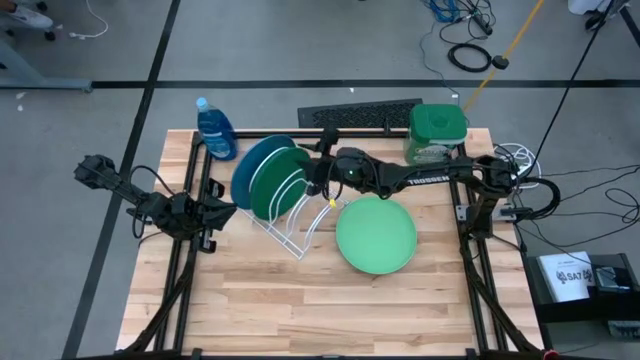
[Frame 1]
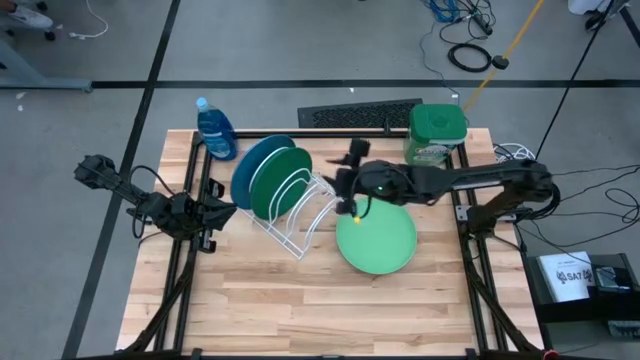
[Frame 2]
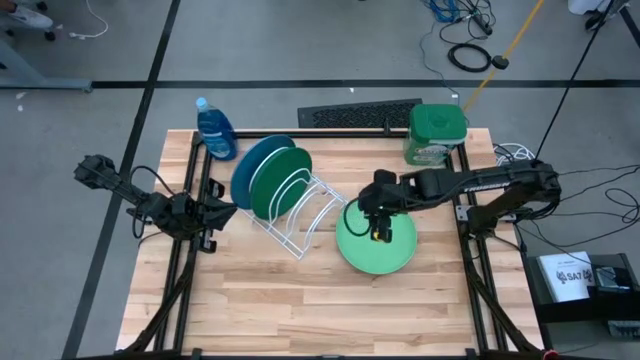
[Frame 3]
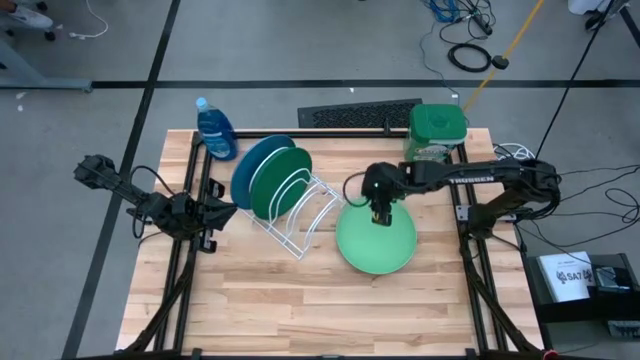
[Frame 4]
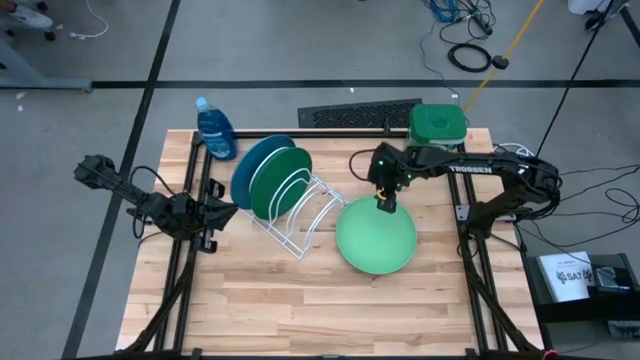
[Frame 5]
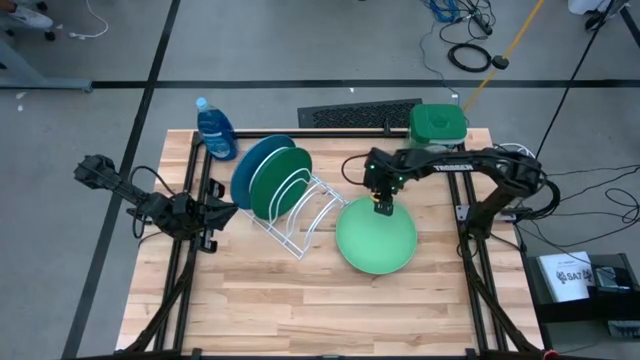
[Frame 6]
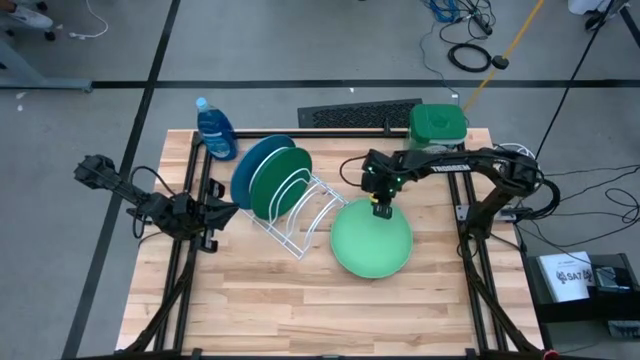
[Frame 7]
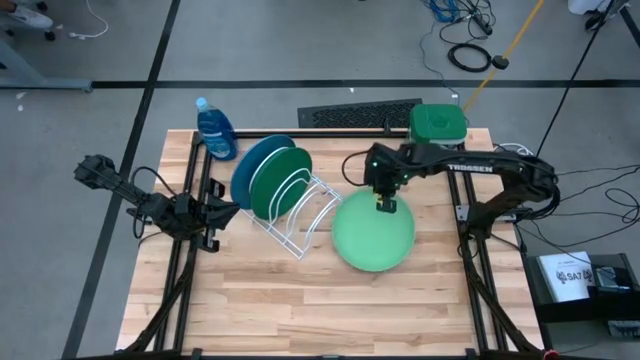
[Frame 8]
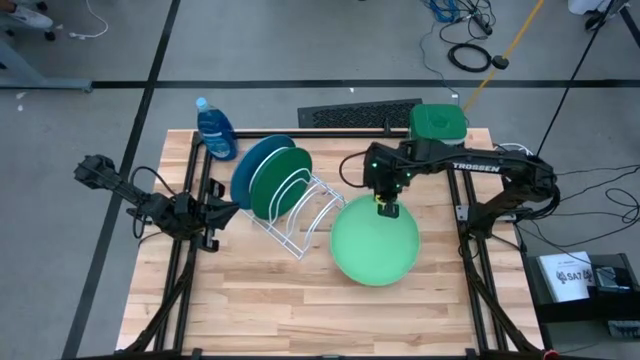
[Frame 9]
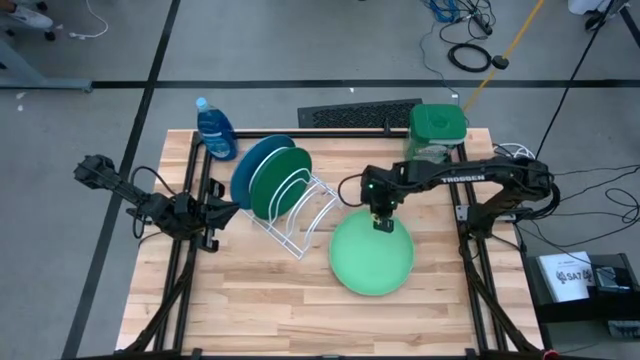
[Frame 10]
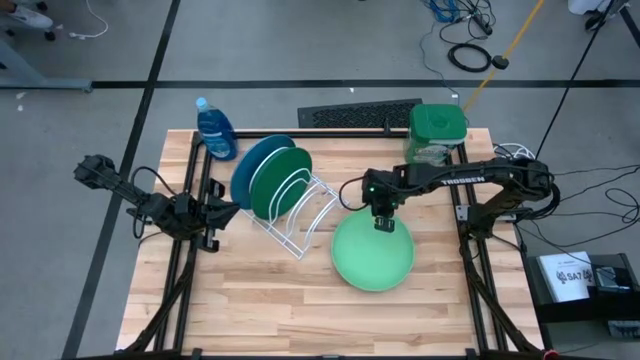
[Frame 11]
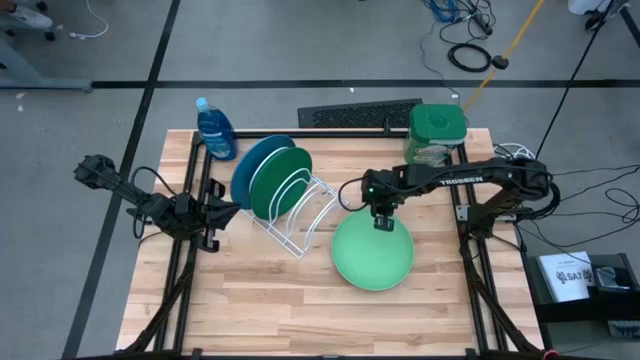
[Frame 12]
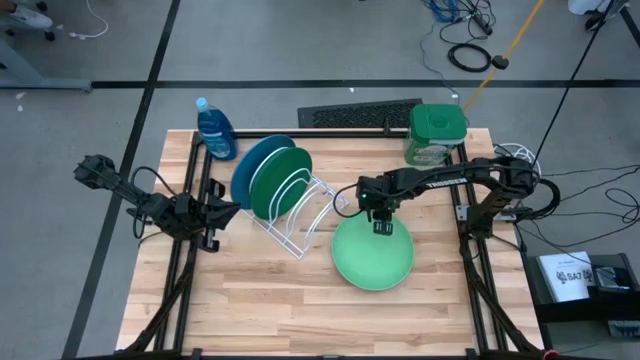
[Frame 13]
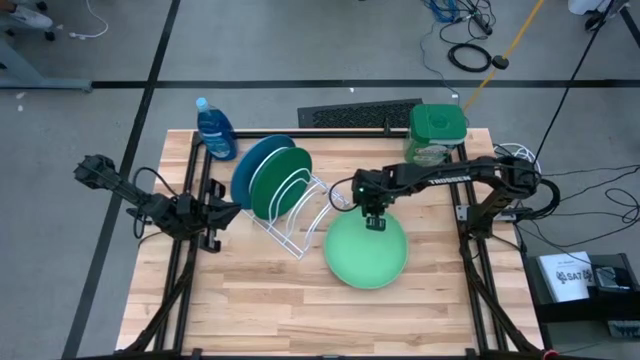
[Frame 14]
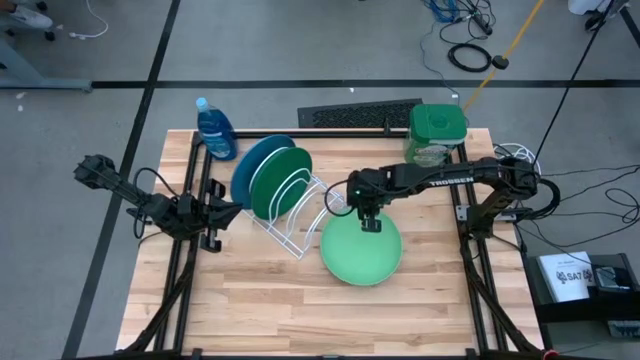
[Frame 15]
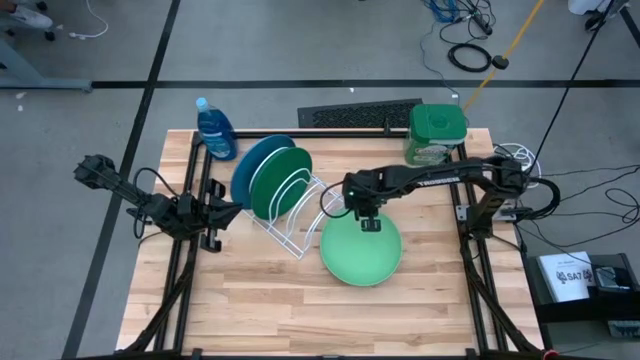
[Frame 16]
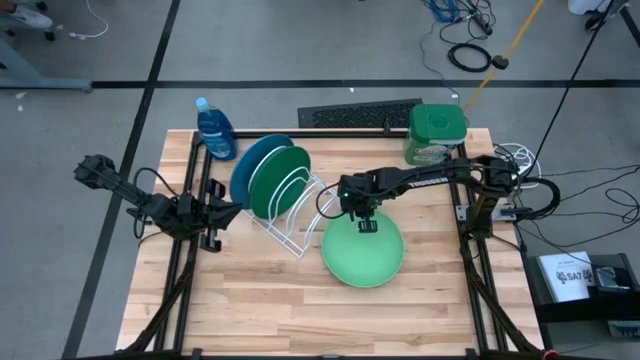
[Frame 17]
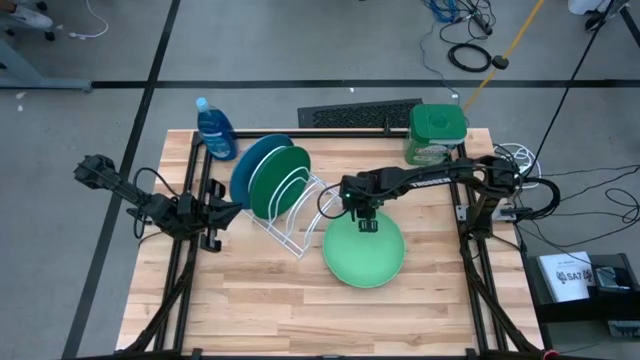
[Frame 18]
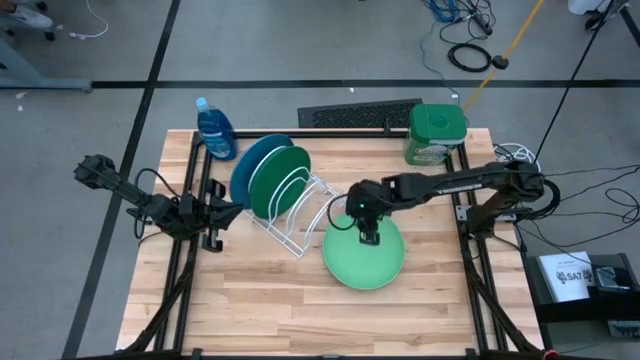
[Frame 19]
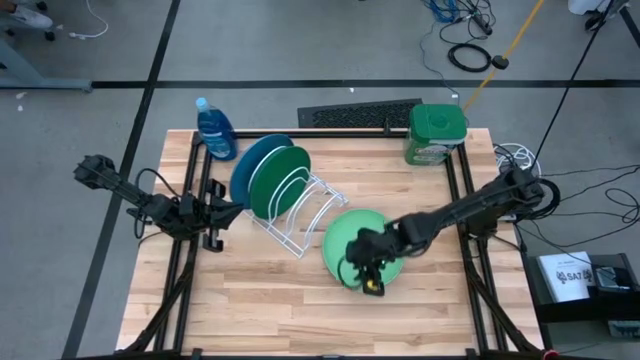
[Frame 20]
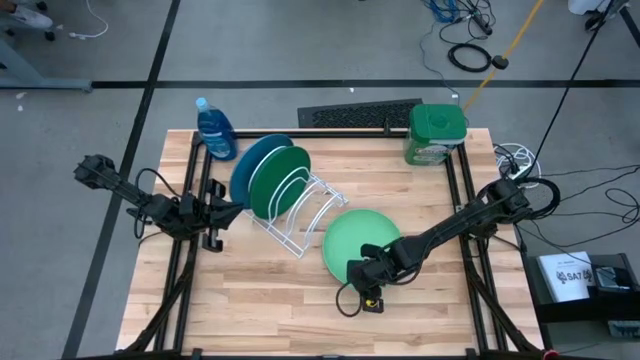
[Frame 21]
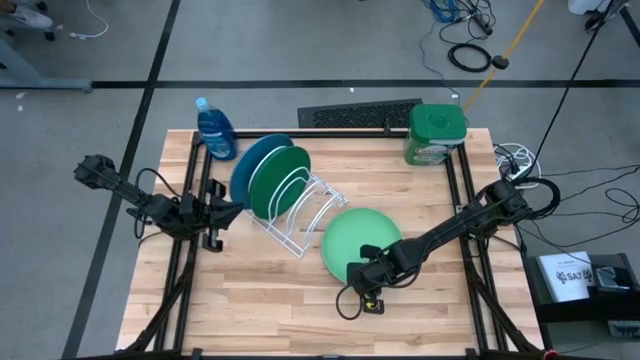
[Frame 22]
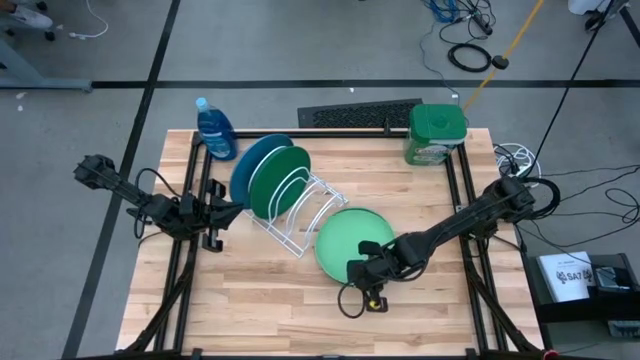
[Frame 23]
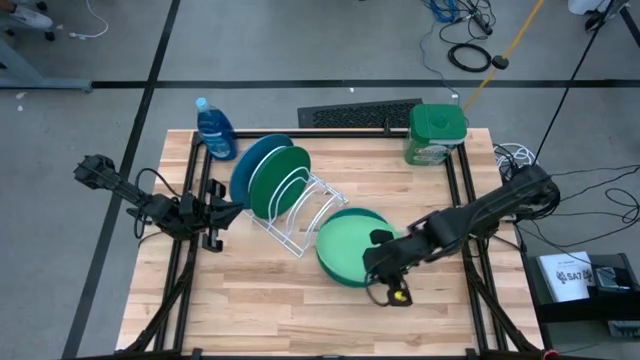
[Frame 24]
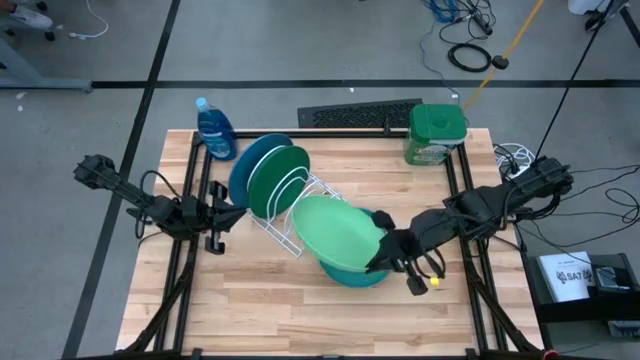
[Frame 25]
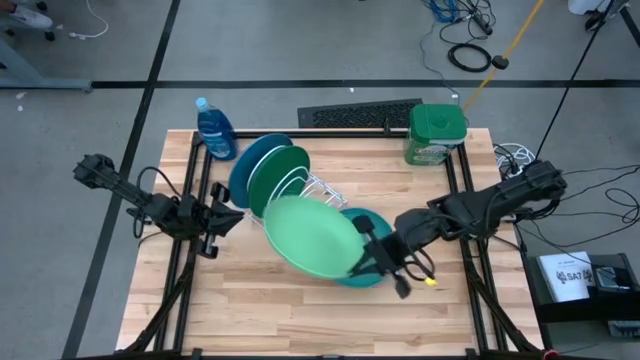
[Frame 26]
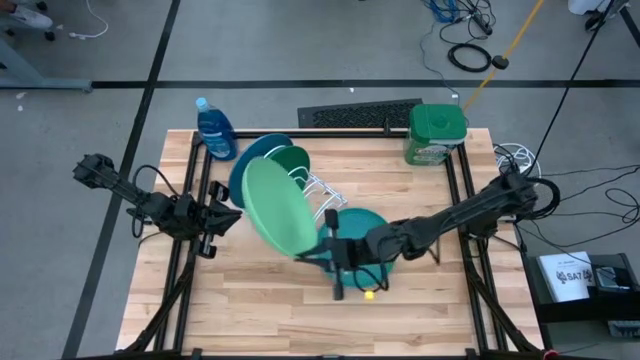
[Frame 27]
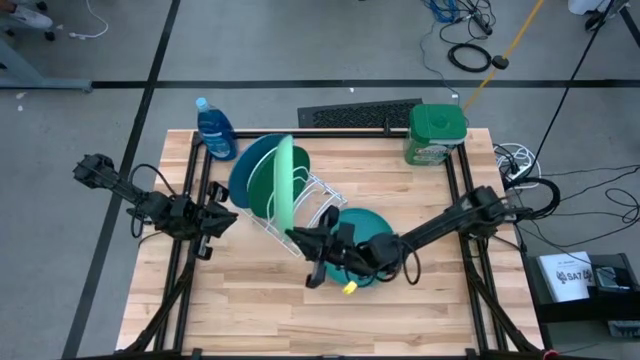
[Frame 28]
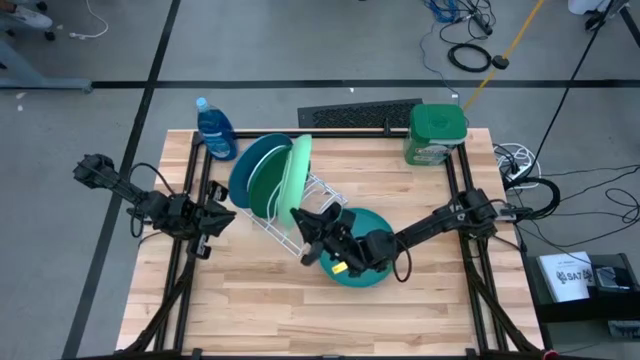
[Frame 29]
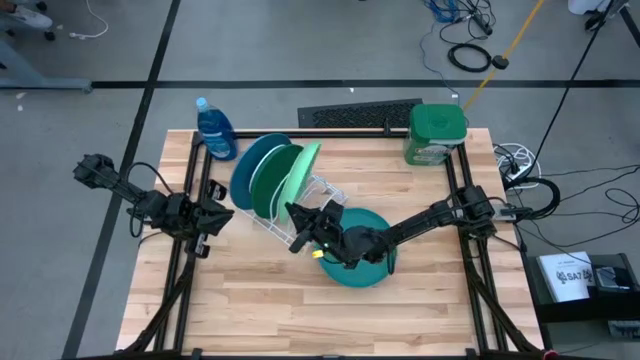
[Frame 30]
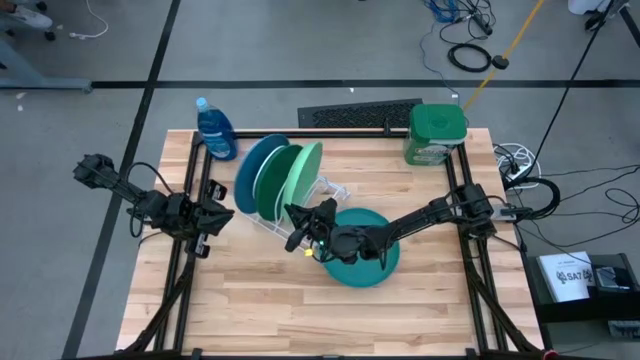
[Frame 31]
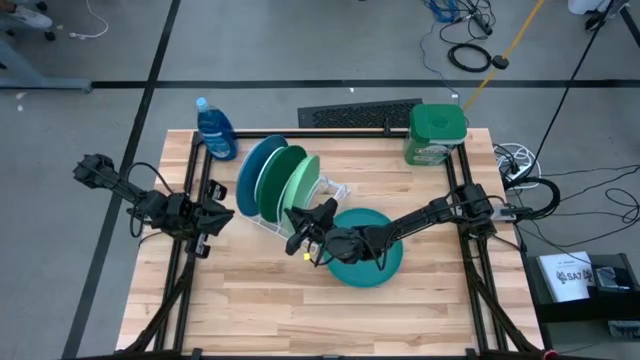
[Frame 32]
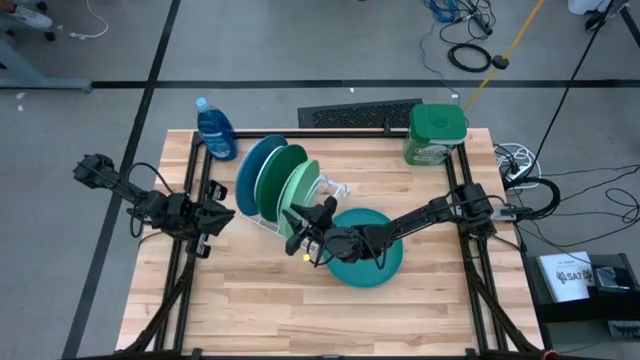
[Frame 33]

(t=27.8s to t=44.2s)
Task: Sort dishes
Put the light green plate on the dish rack

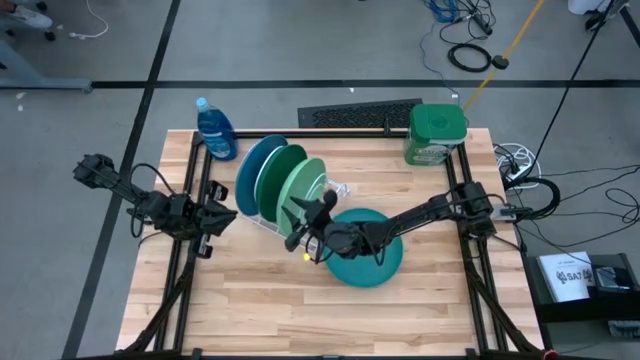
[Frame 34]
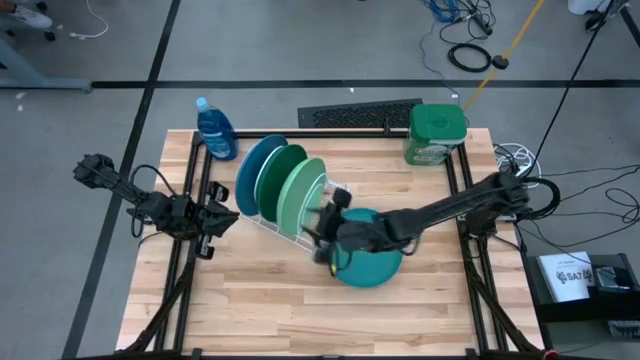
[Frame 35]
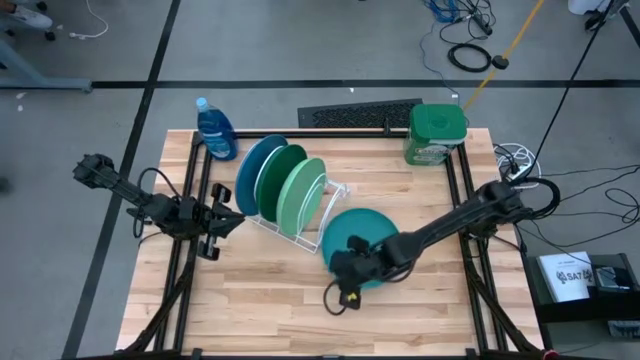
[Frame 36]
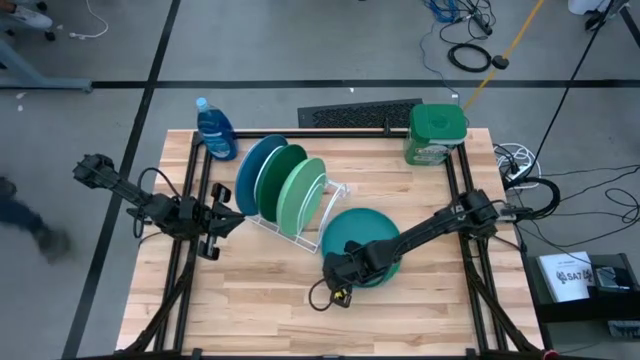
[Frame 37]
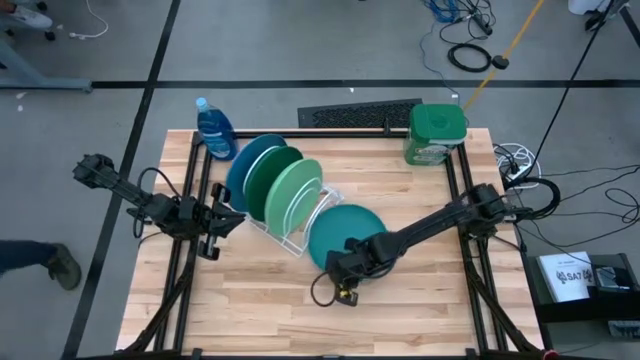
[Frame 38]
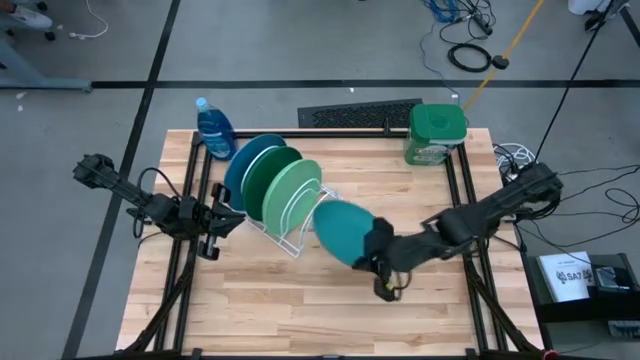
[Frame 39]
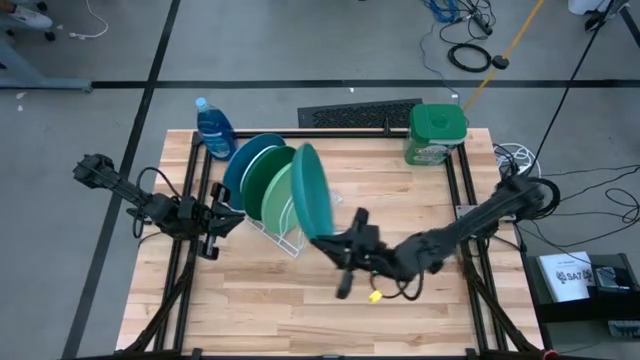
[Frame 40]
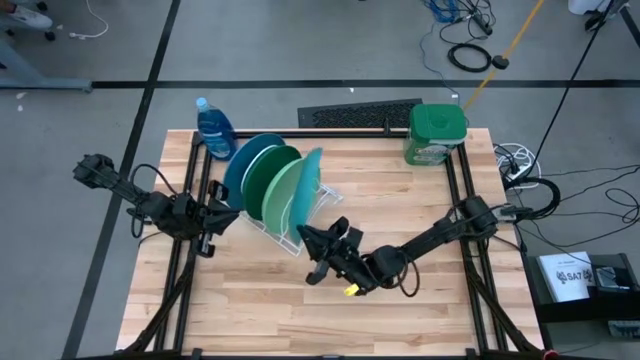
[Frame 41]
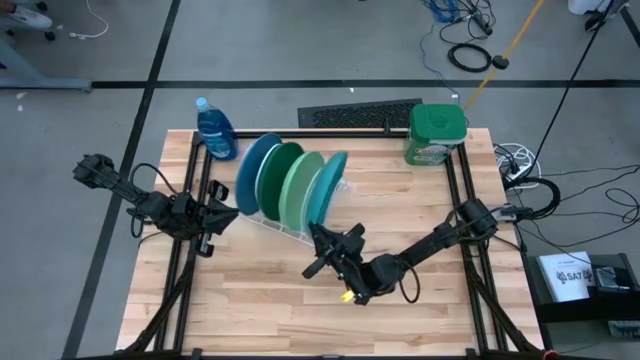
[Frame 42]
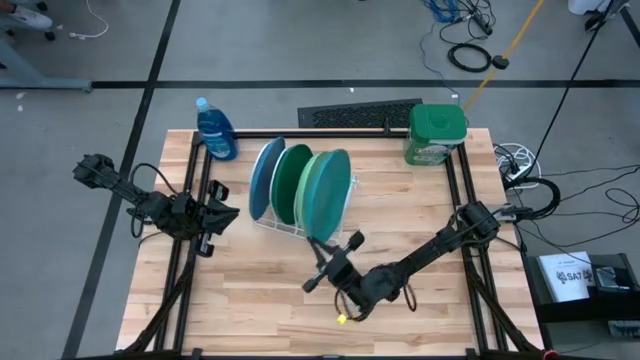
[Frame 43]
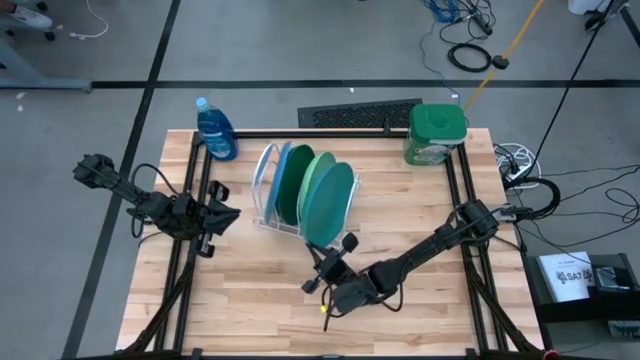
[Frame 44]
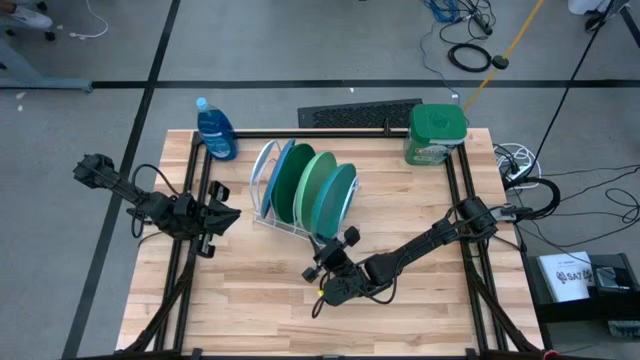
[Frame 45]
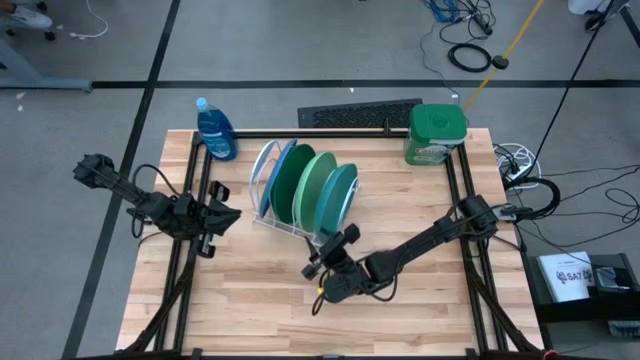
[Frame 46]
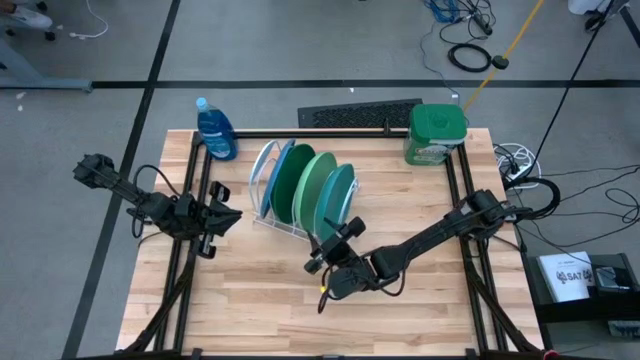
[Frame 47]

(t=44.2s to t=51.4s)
Put the blue plate on the dish rack
